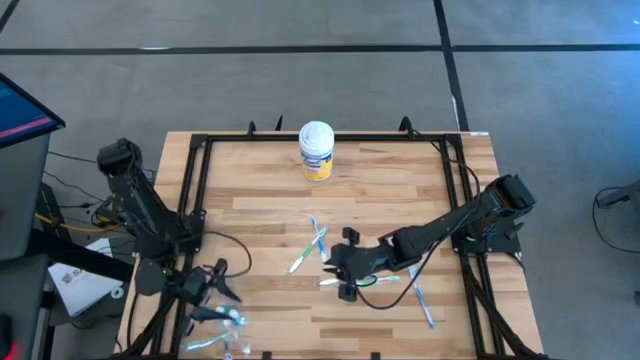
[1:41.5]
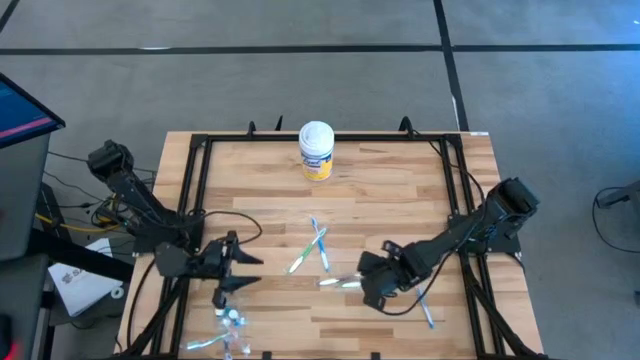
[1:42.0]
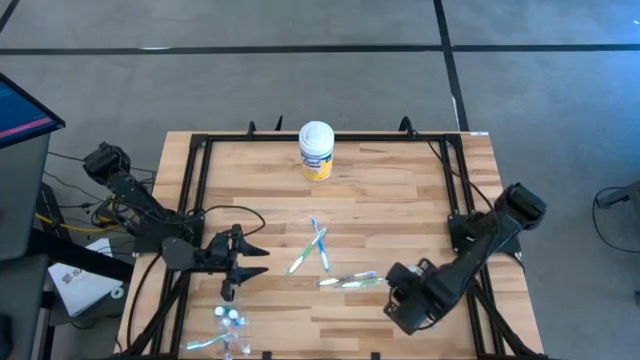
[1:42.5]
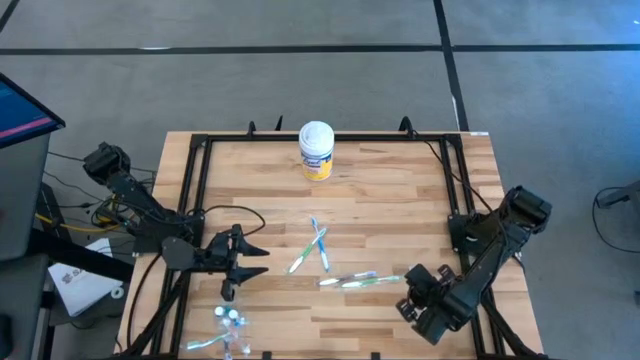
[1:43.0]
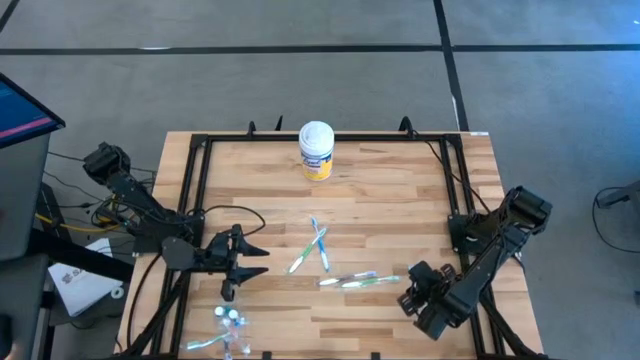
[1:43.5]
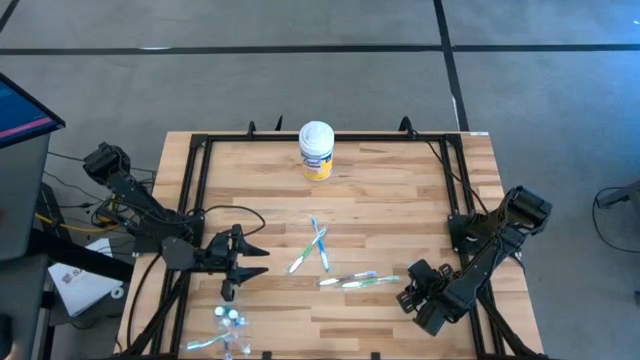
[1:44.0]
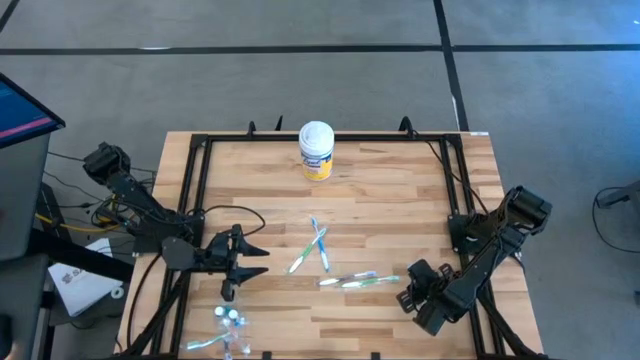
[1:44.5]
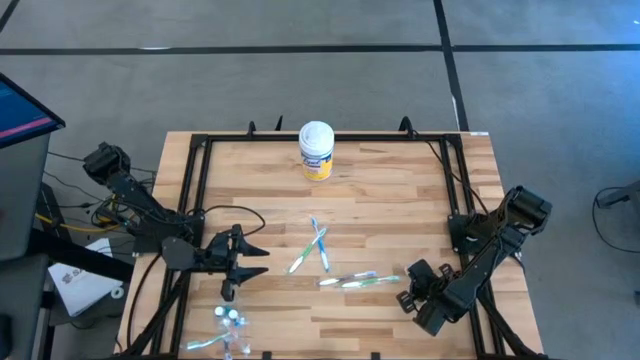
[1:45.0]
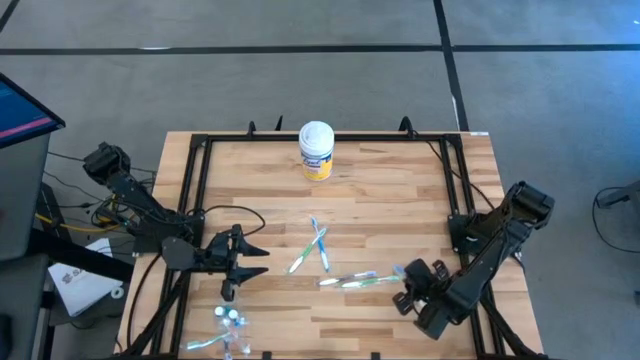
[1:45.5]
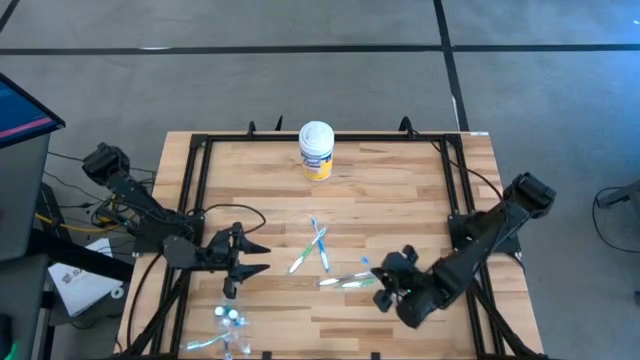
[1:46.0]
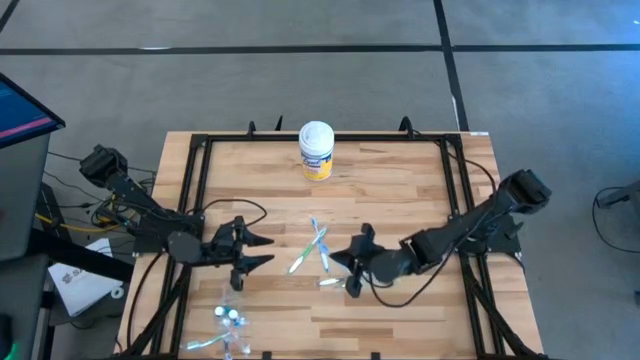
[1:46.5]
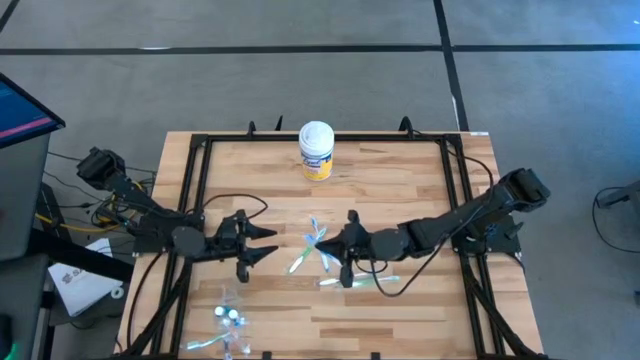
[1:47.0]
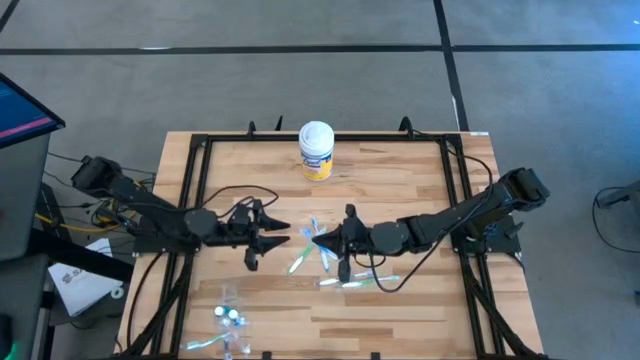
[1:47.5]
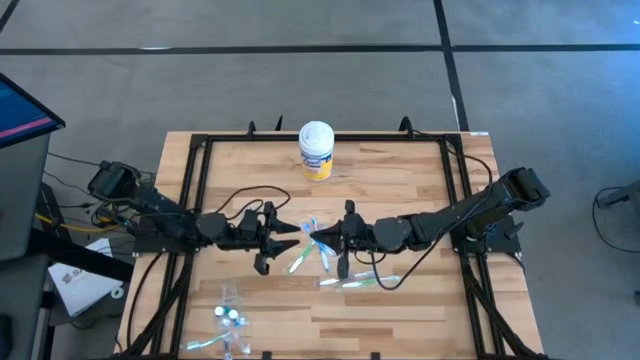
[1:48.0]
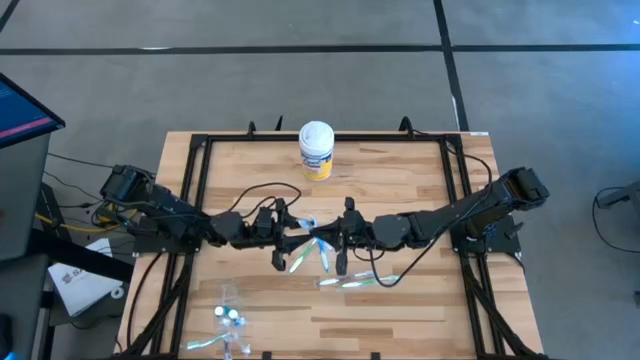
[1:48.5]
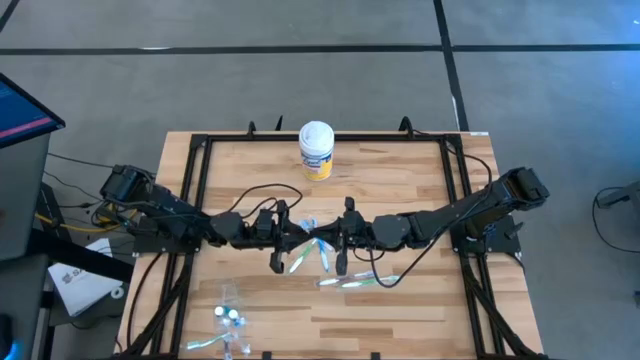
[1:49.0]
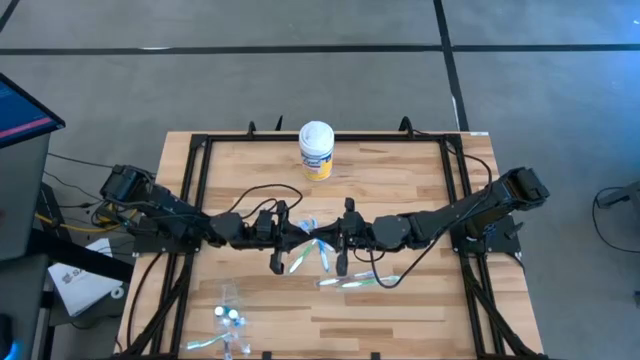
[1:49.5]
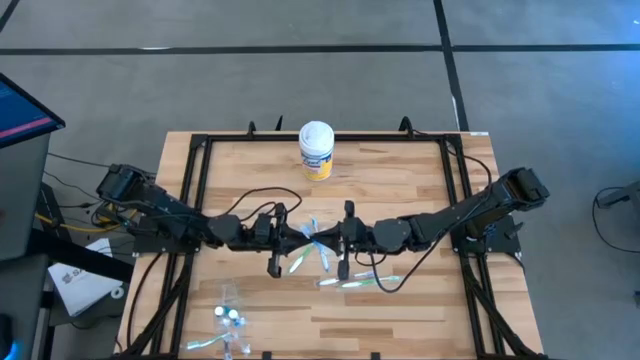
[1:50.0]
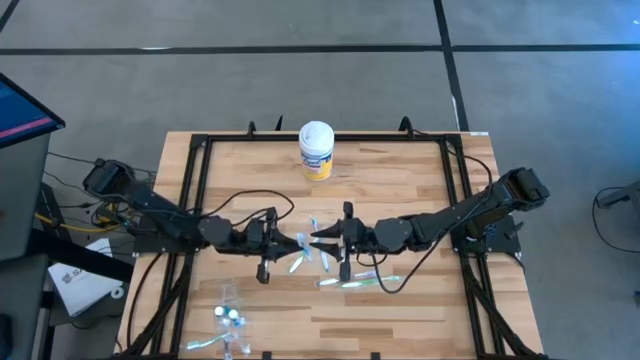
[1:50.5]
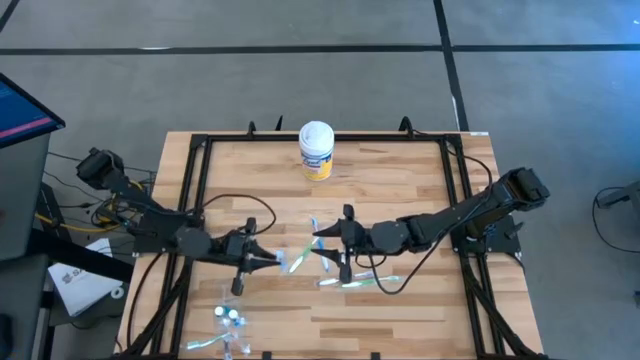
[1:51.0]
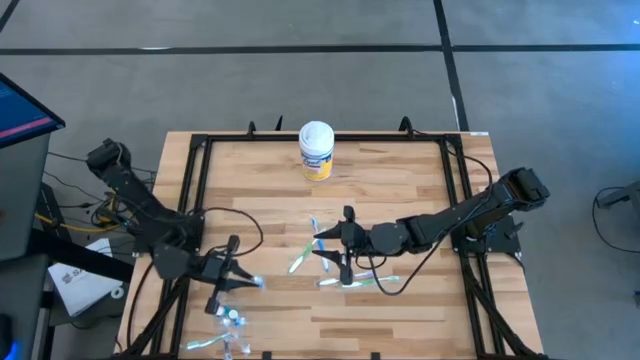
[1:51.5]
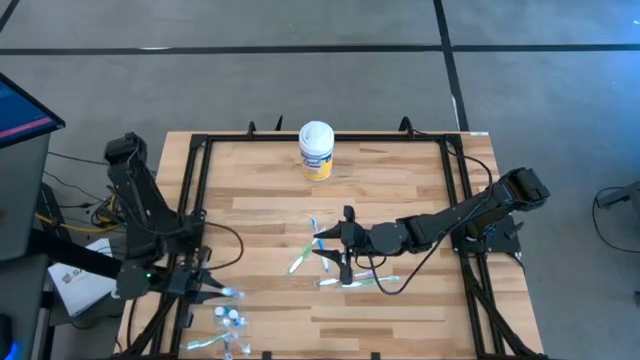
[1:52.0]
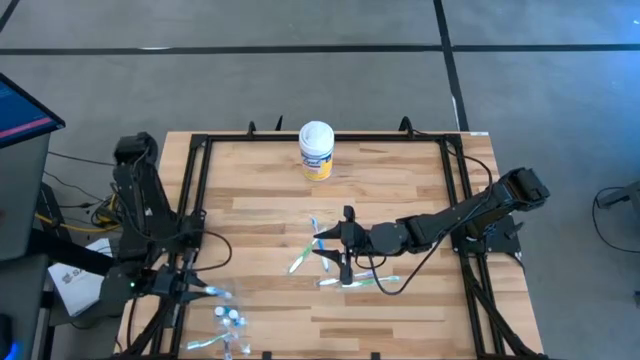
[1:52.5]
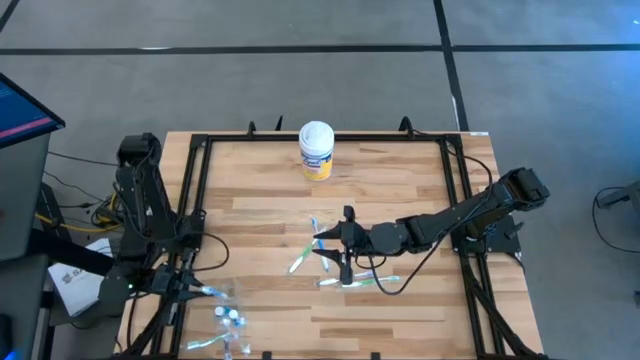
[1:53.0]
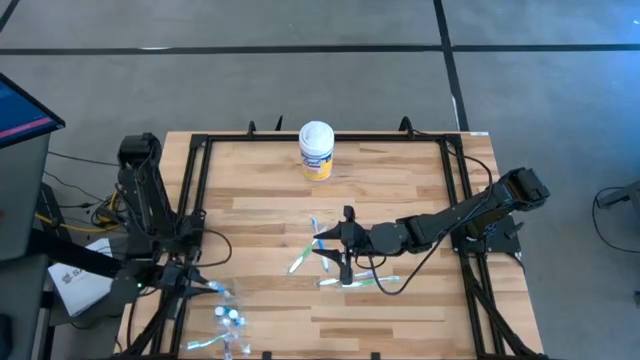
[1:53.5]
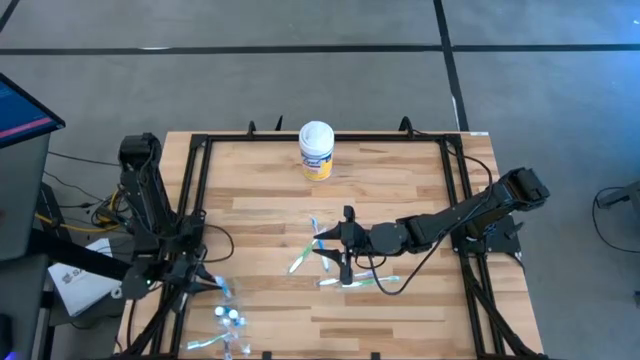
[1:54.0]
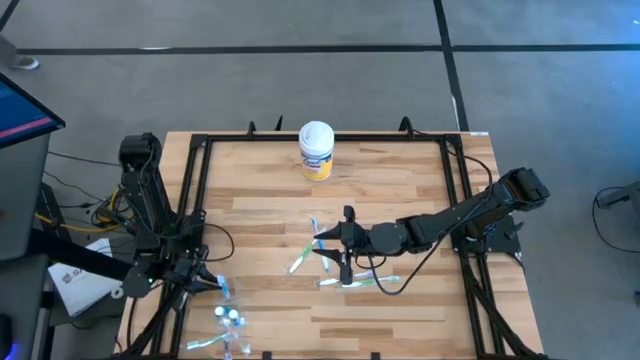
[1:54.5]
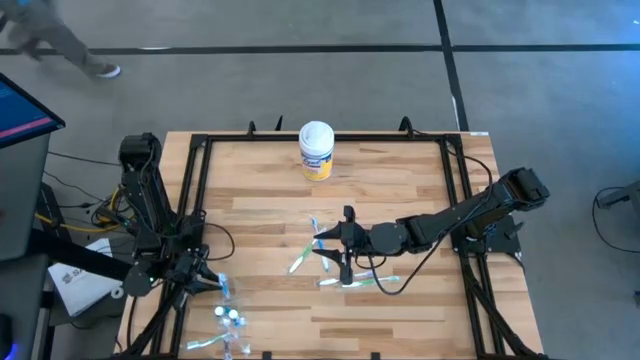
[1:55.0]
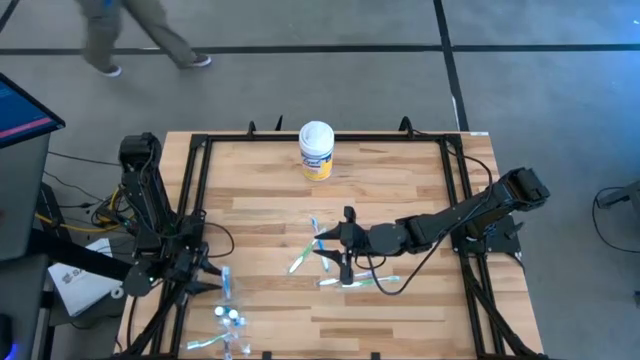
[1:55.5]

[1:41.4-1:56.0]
Task: Pick & Place toothbrushing station
Put the right blue toothbrush into the transparent organizer

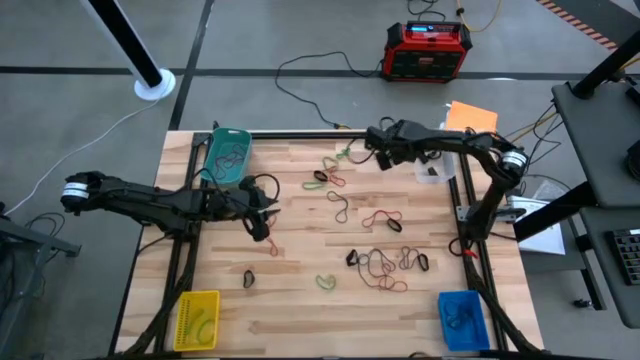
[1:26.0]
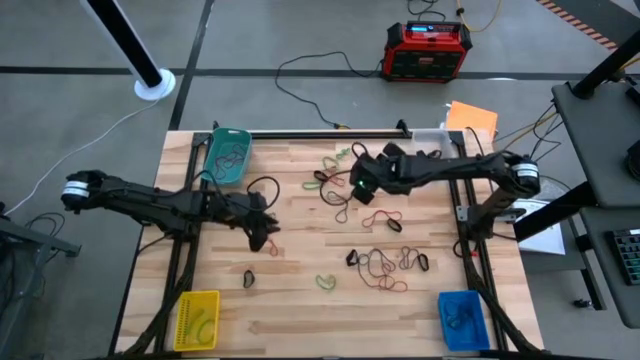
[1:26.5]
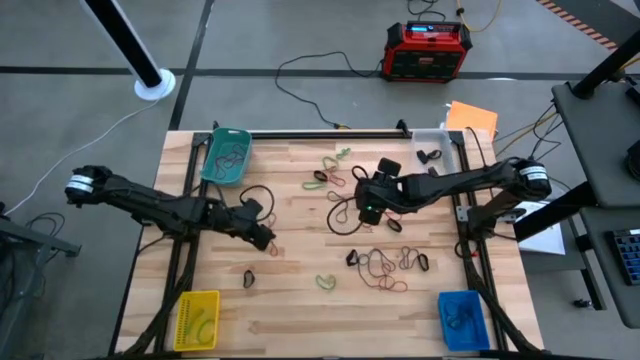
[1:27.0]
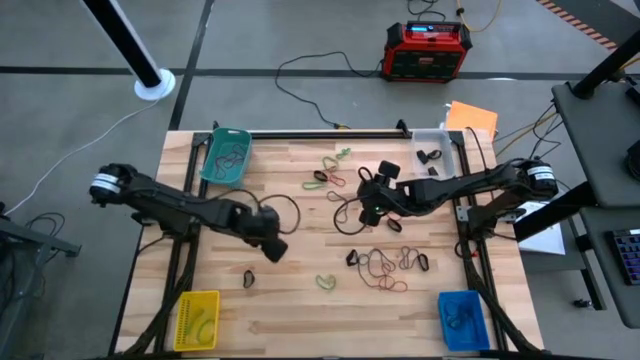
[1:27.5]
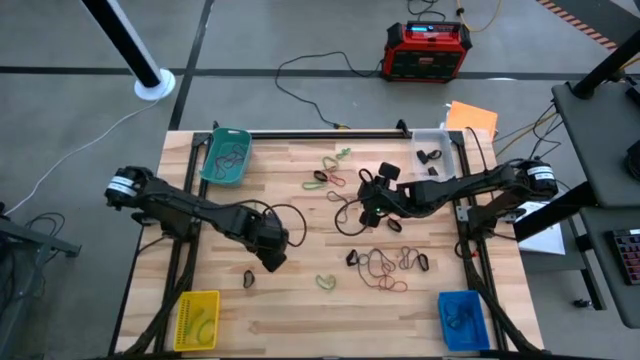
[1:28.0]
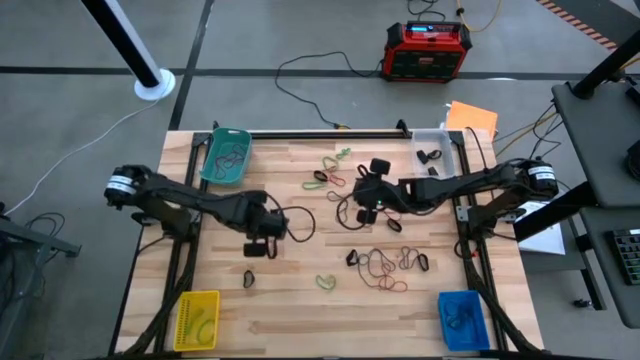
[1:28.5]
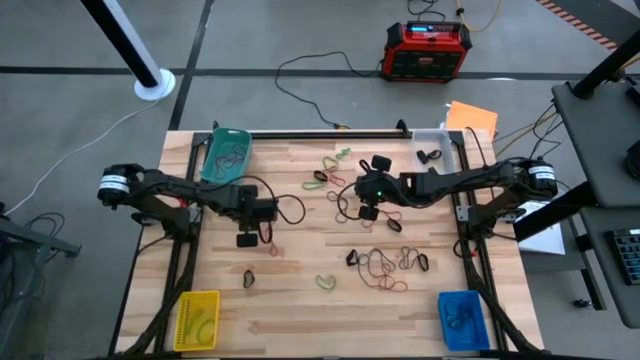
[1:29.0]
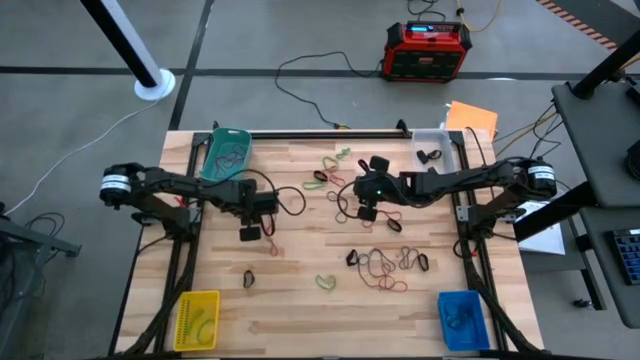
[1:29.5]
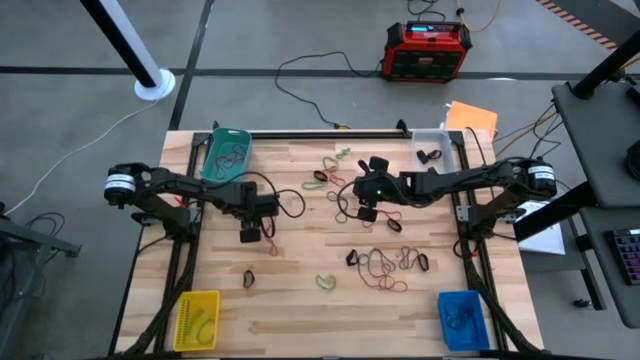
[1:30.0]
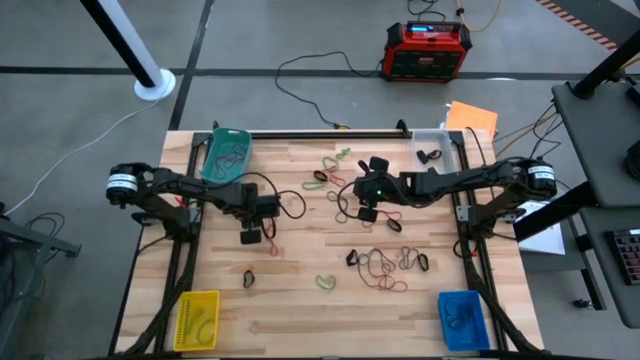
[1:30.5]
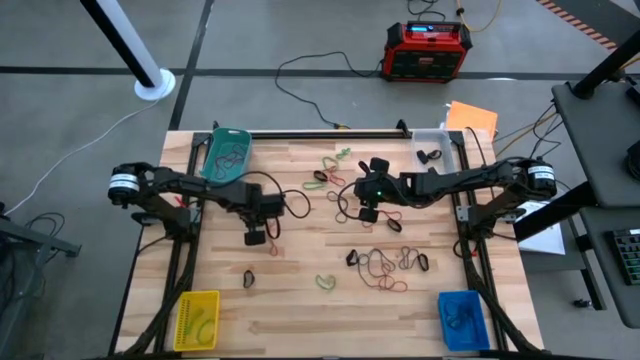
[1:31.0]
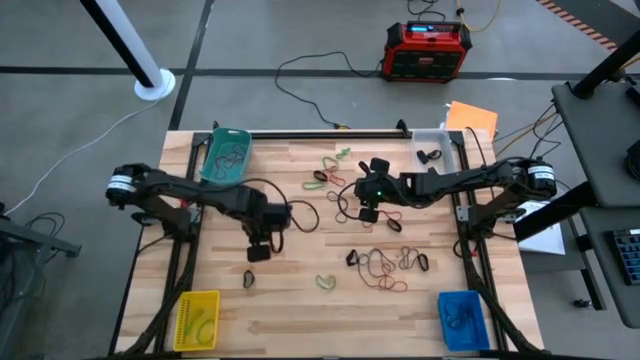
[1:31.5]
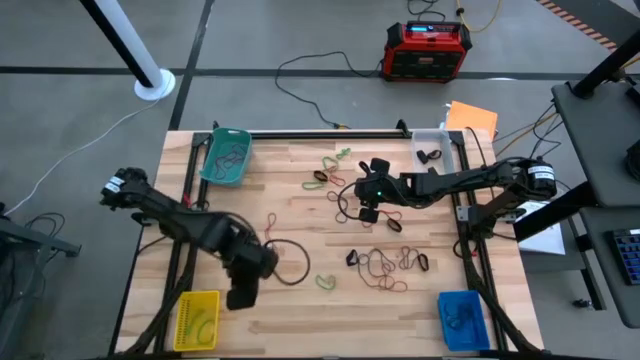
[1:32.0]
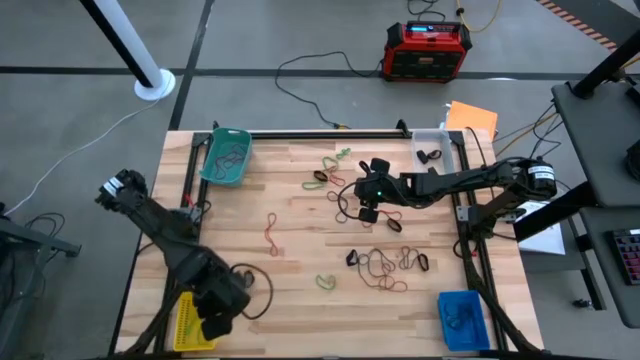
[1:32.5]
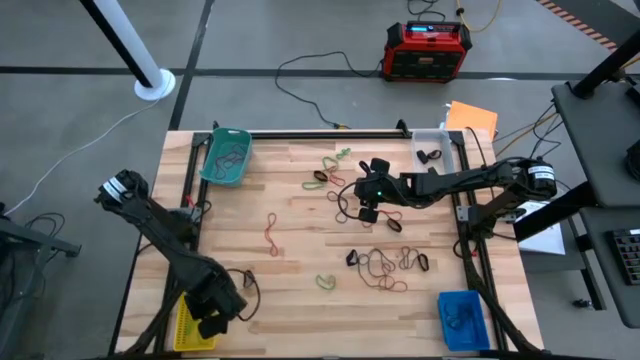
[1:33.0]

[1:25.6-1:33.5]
Task: Sort rubber bands into baskets
Put the green rubber band into the yellow bin
